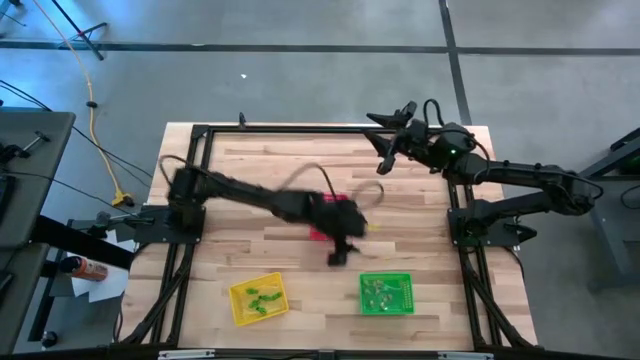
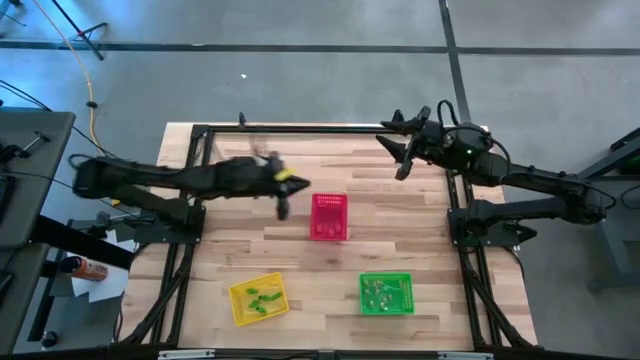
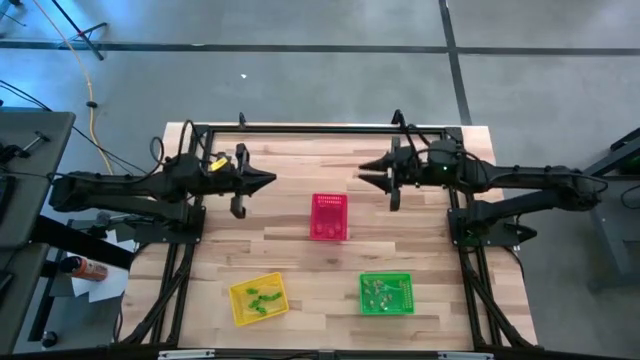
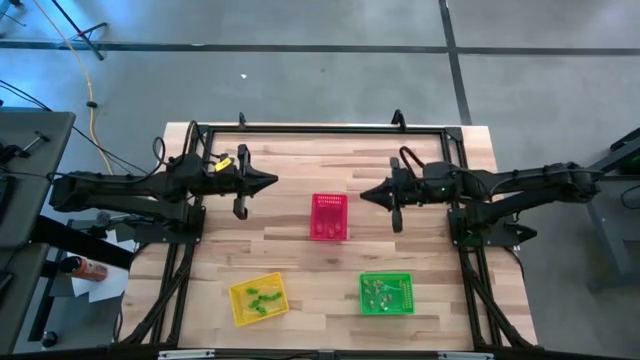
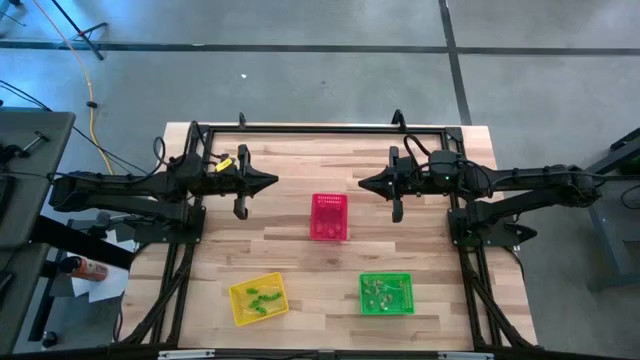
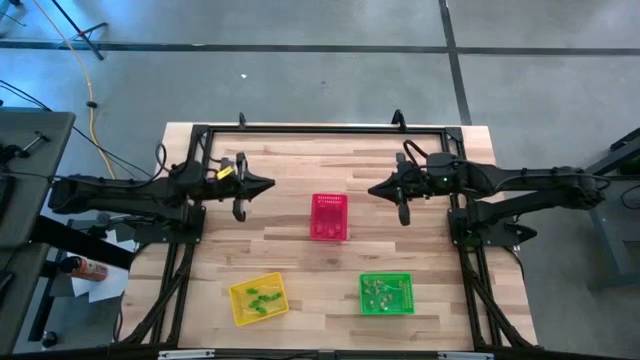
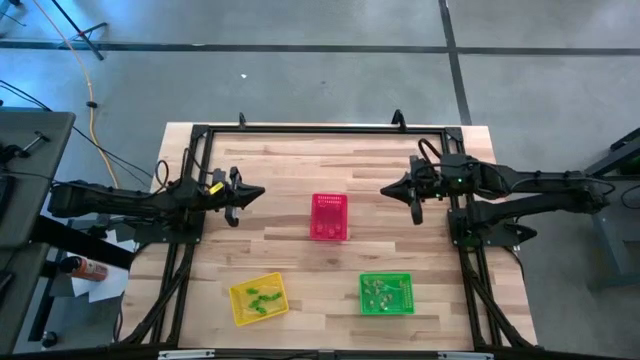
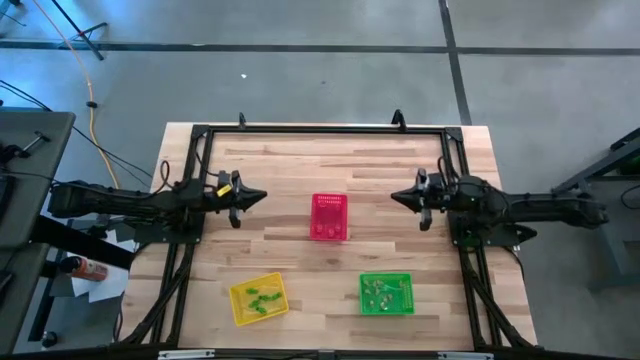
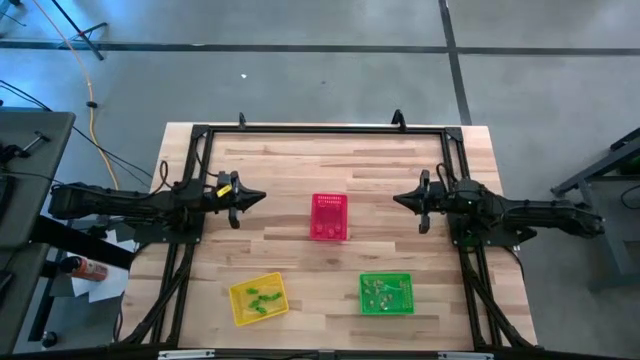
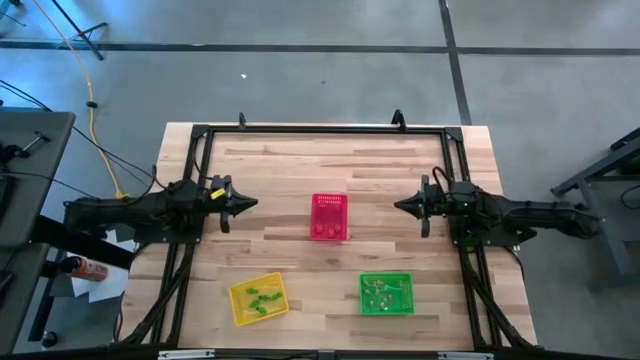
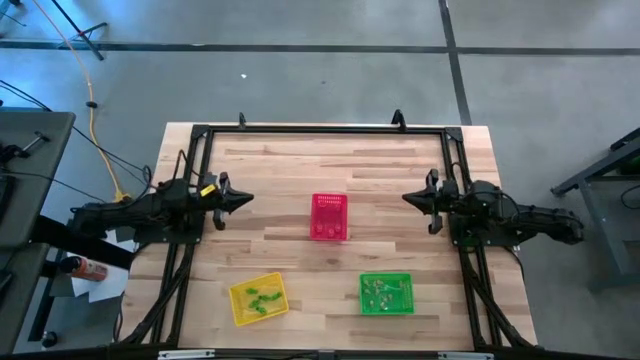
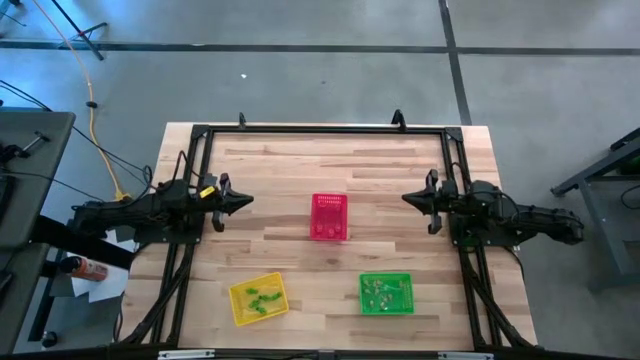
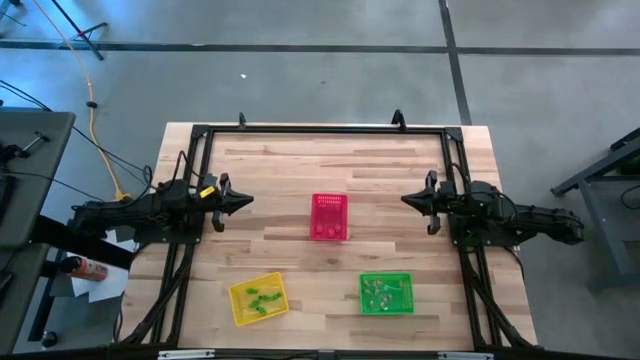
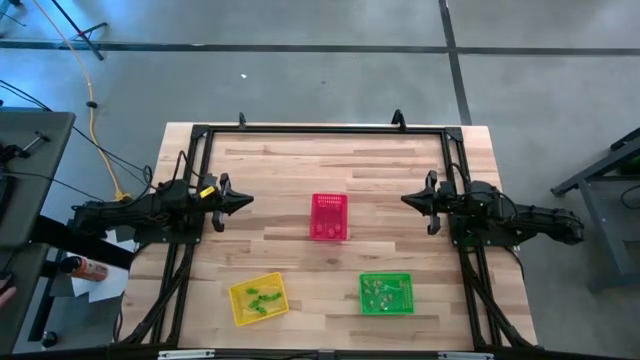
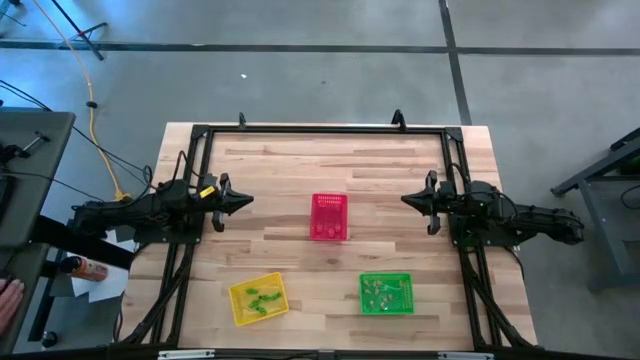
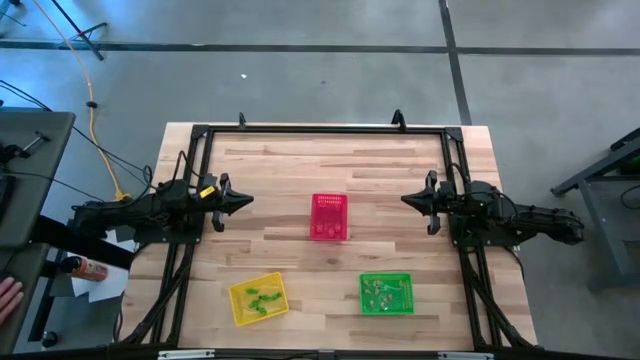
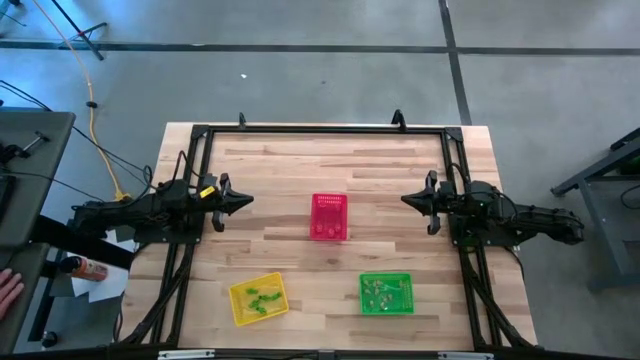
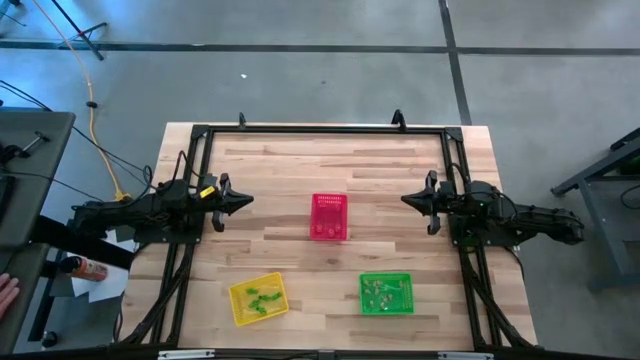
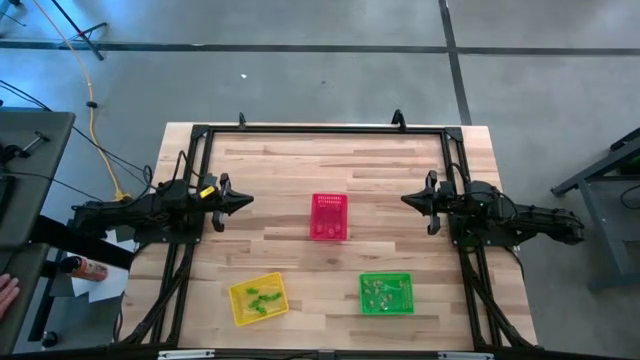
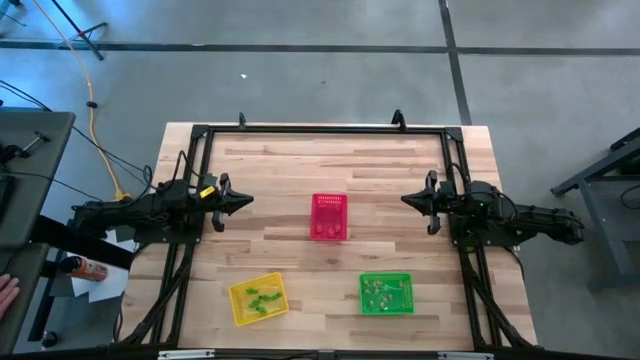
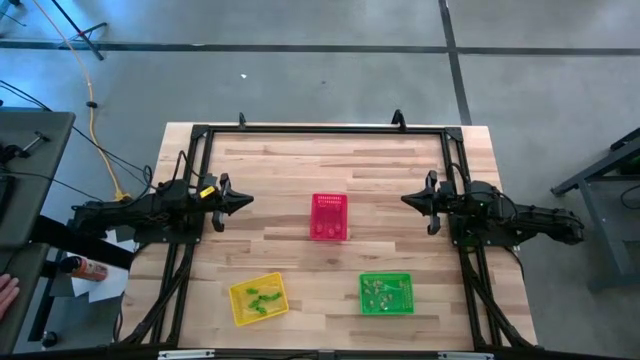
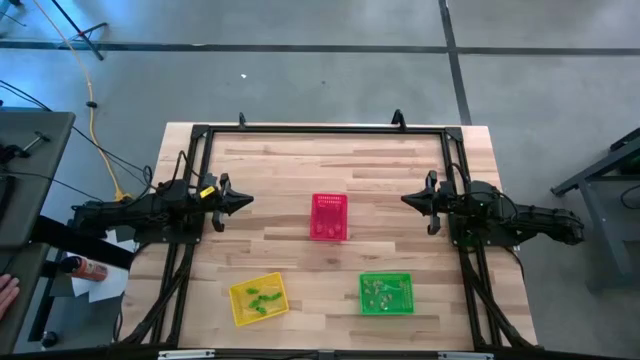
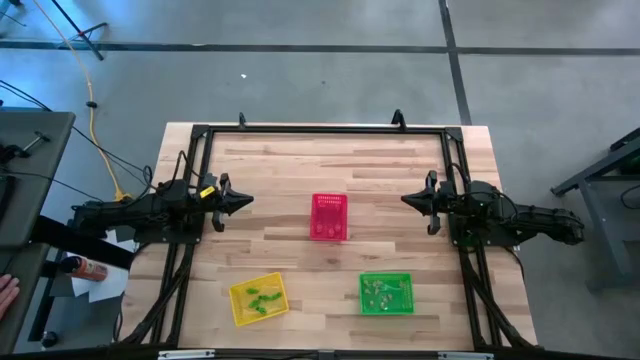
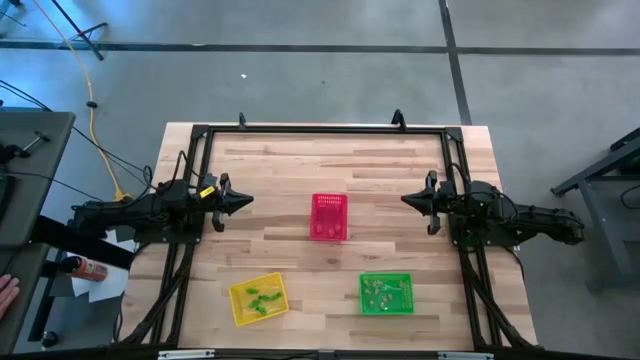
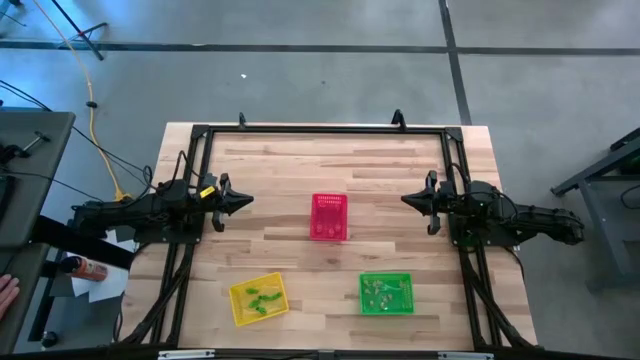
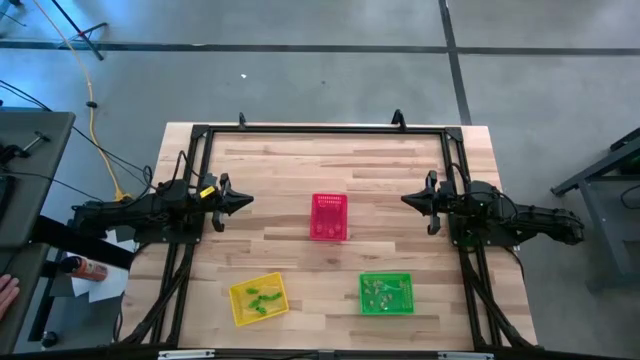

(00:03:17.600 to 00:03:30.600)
Task: Sort Halloween decoration
Return to Home Position

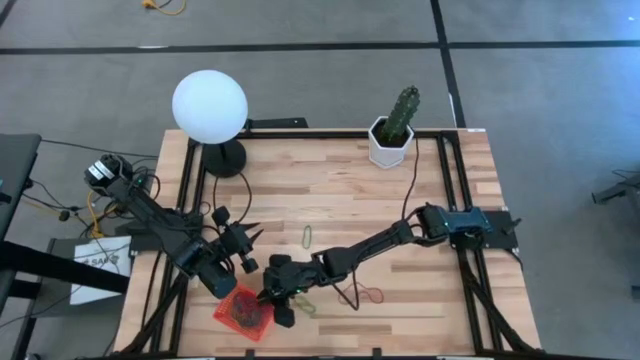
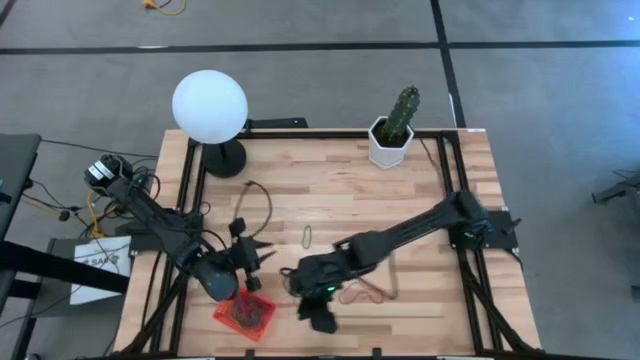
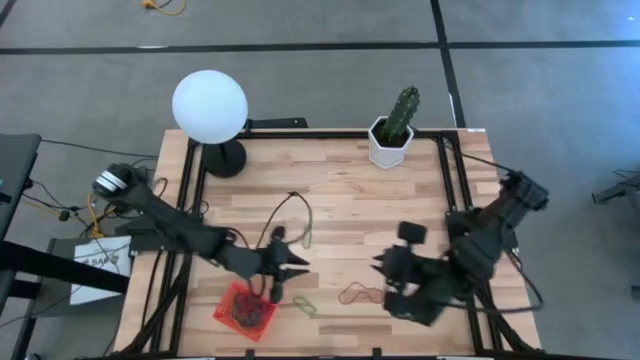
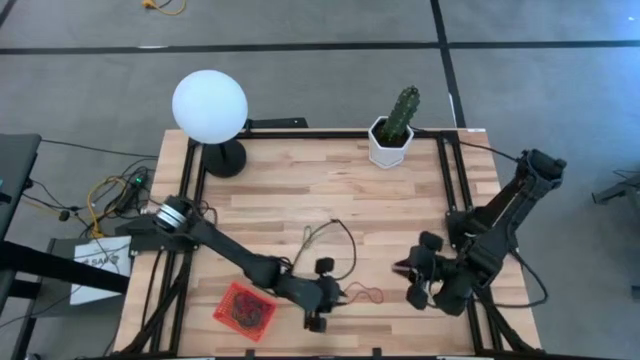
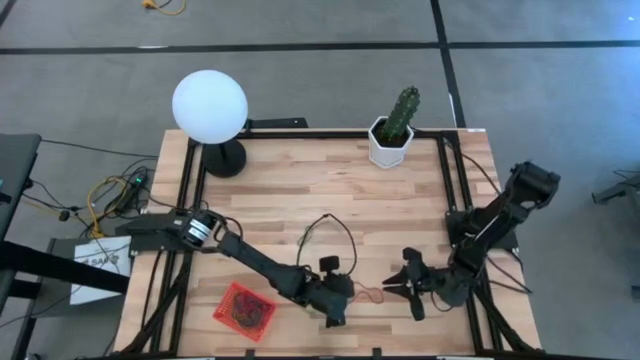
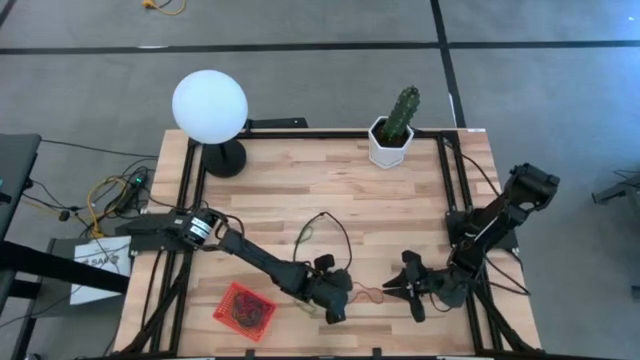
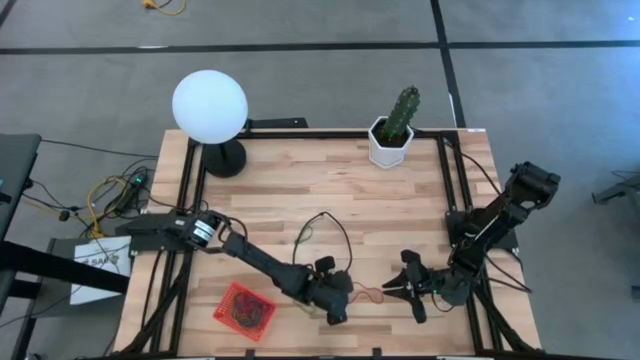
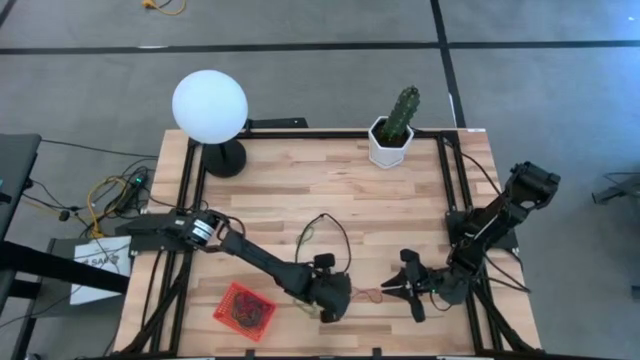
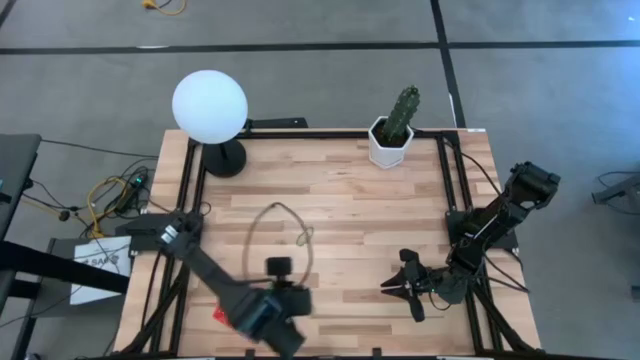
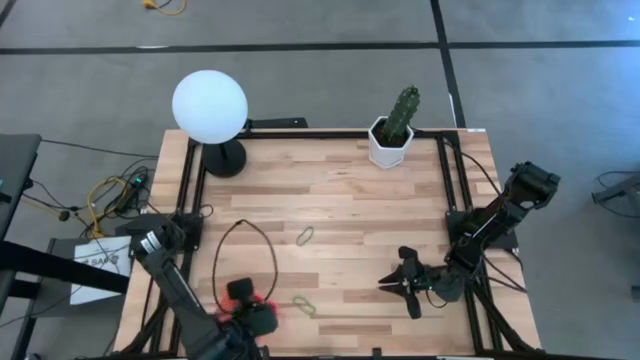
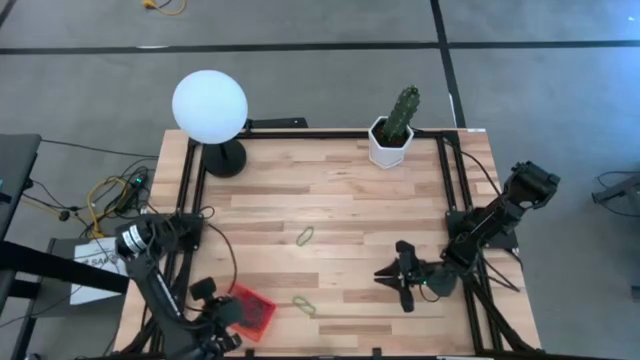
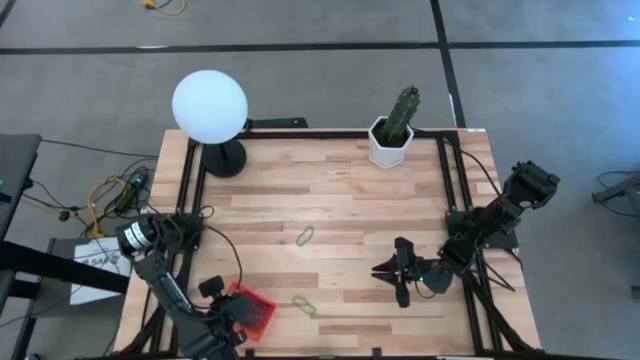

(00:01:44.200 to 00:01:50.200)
Task: Pick and place rubber bands into bin
Put the red rubber band into the basket

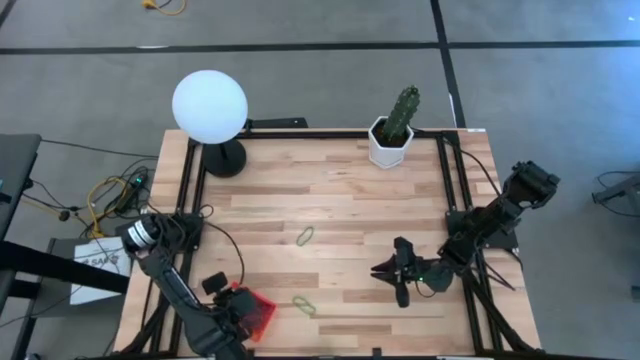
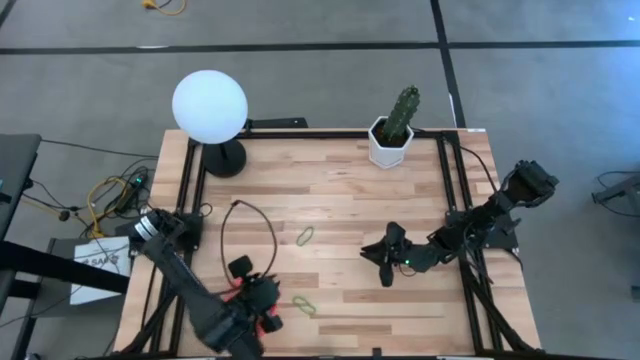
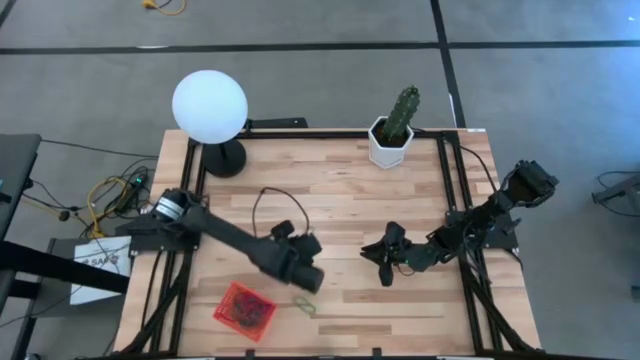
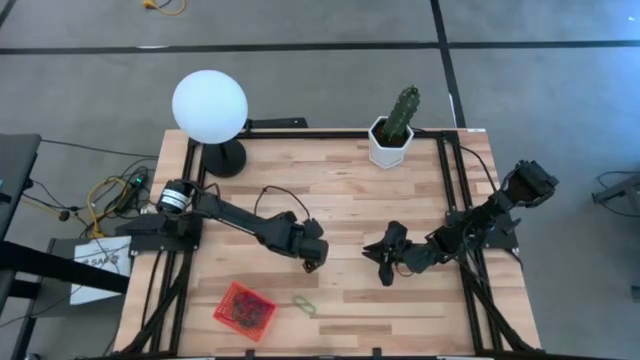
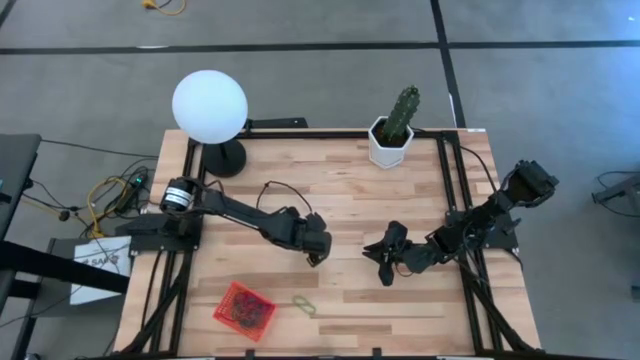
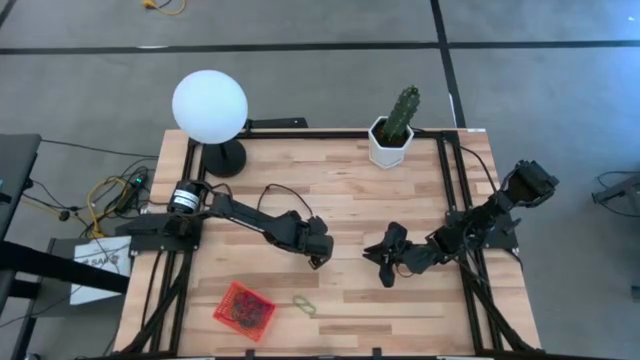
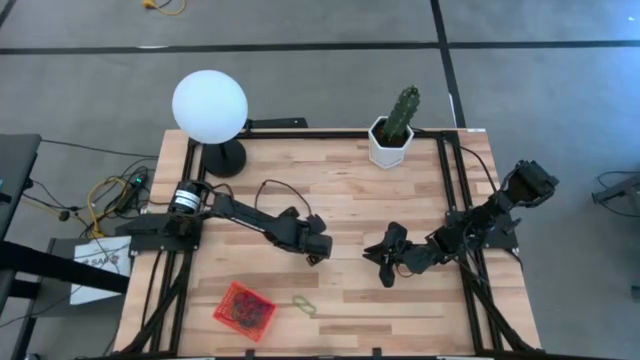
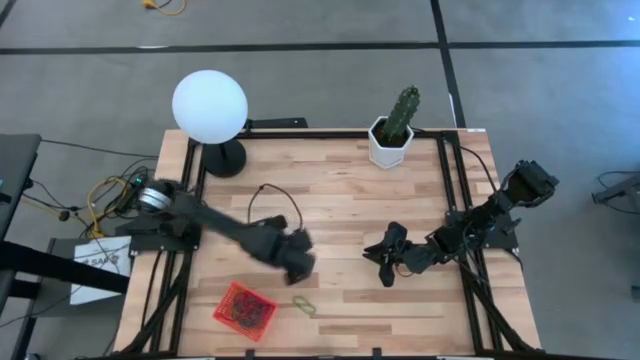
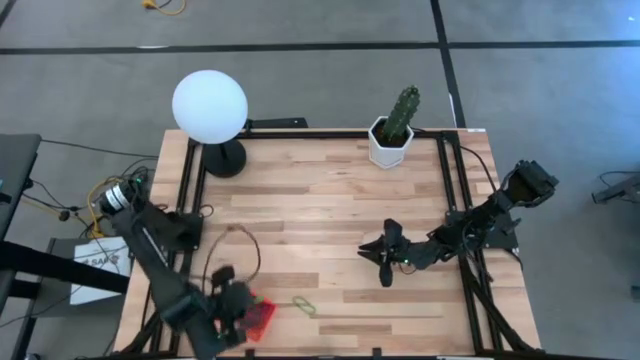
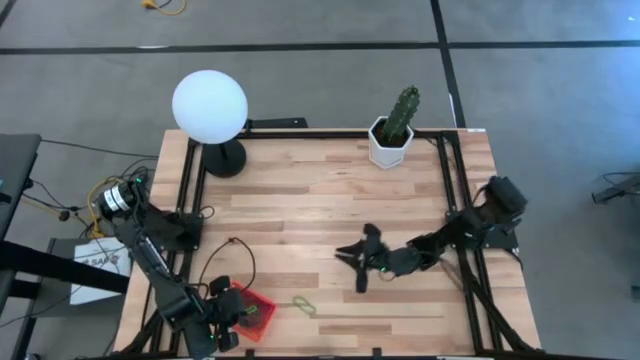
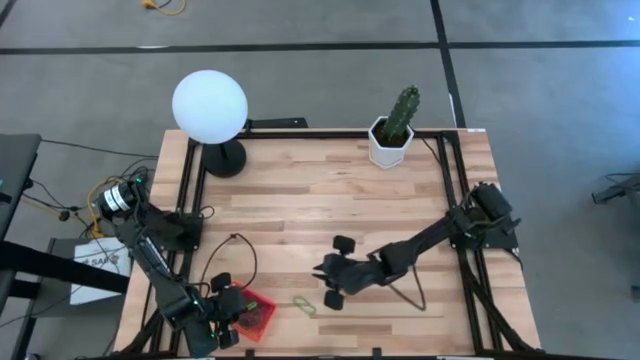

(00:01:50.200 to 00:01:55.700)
Put the top green rubber band into the basket
